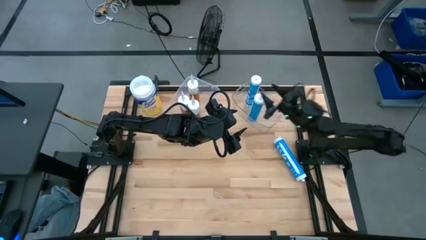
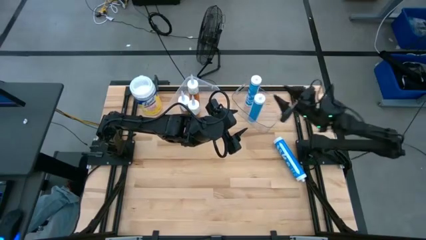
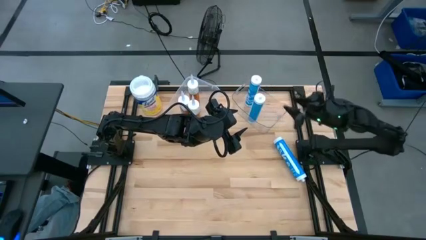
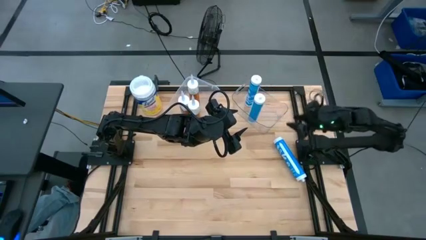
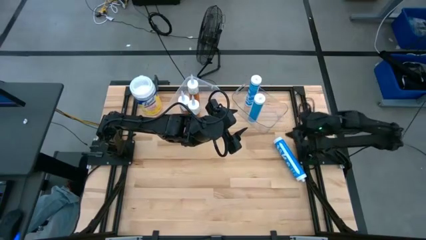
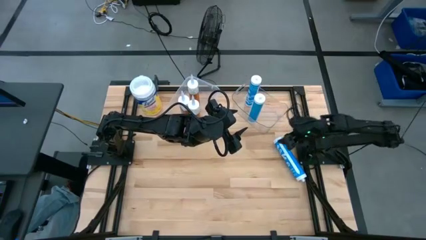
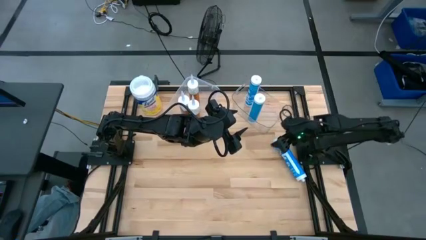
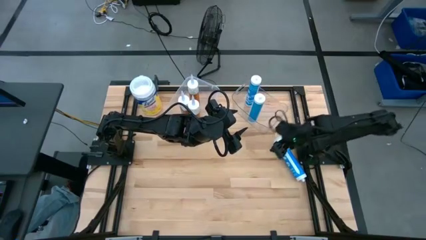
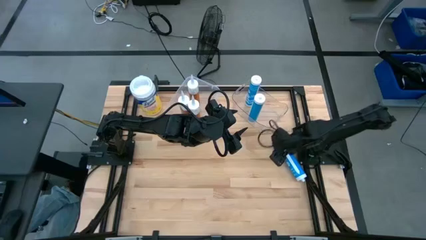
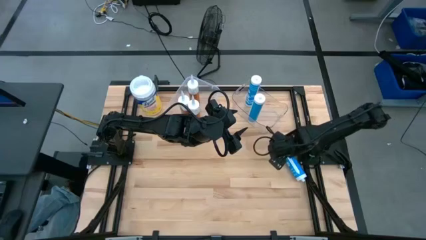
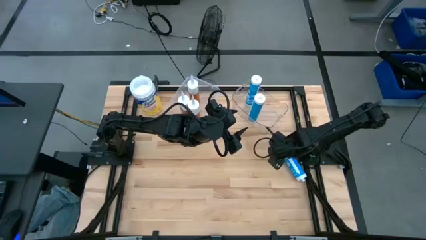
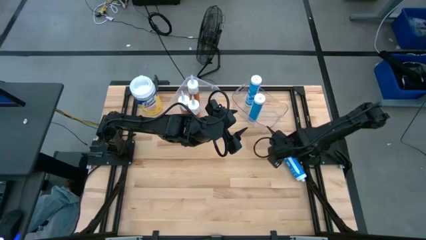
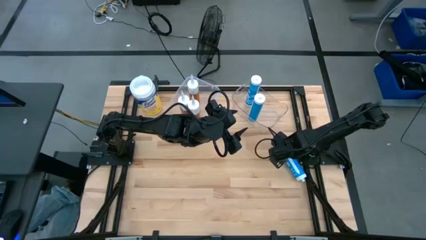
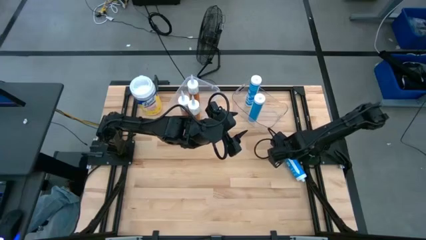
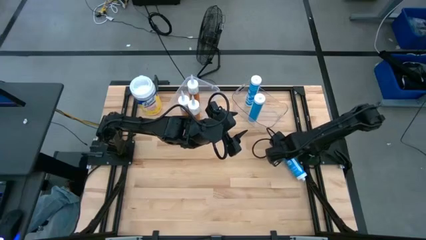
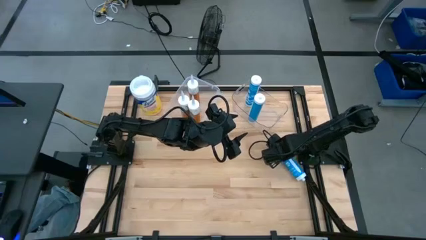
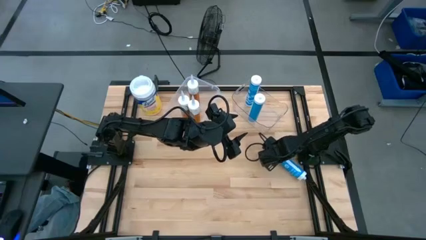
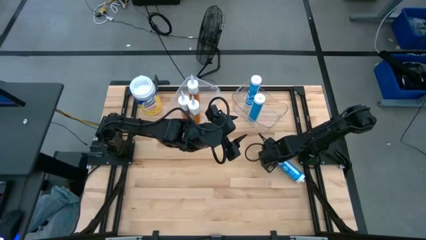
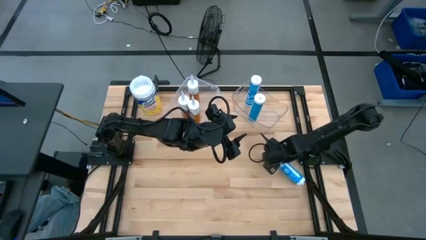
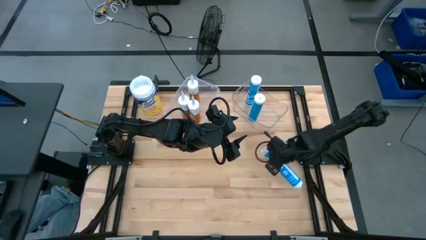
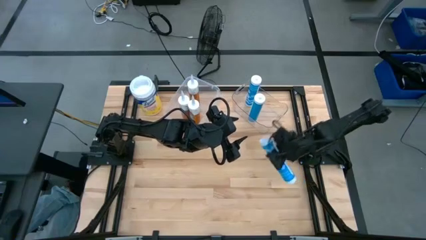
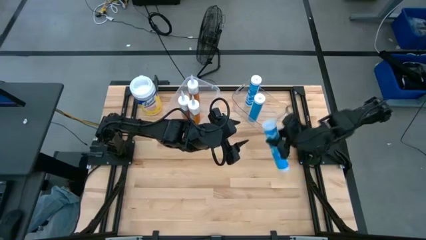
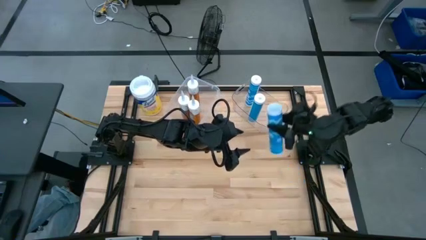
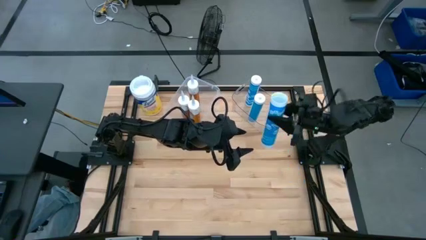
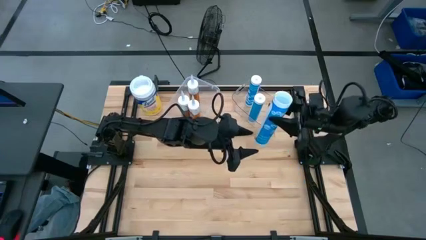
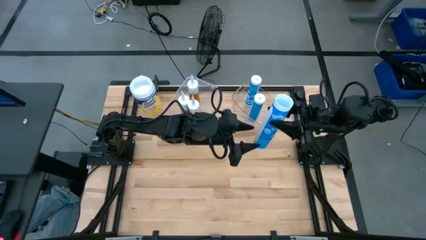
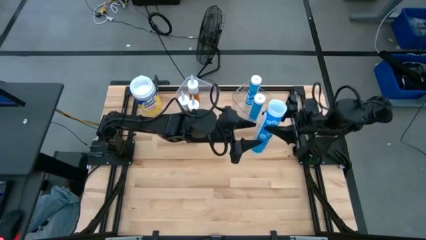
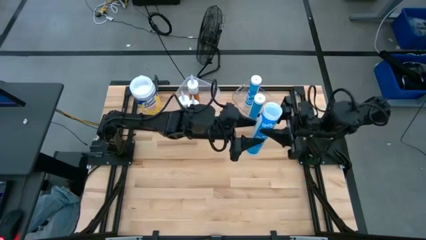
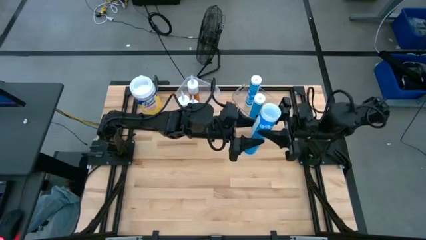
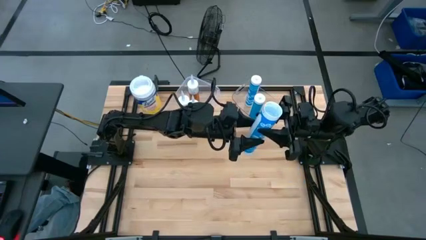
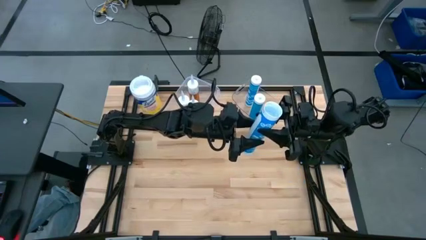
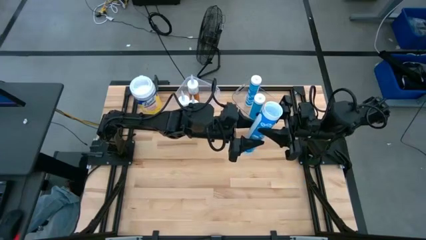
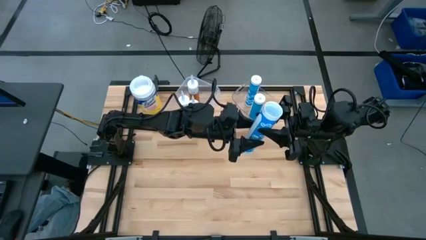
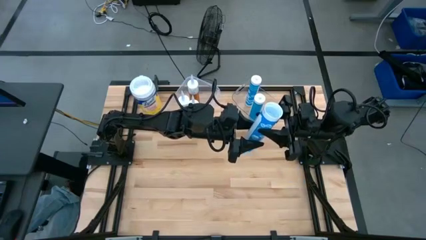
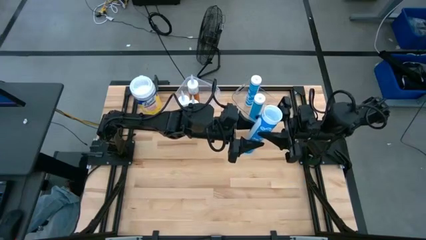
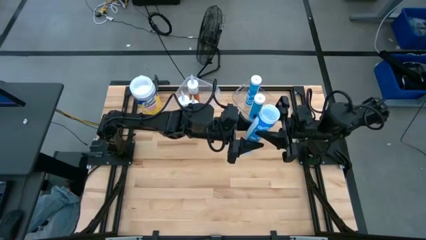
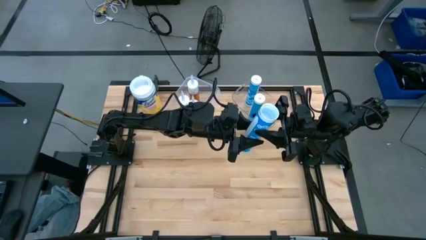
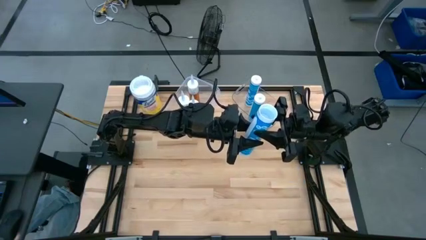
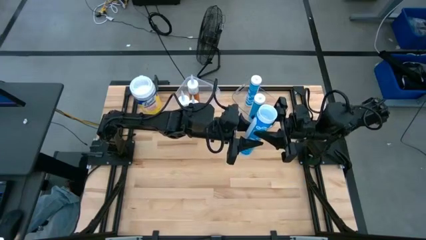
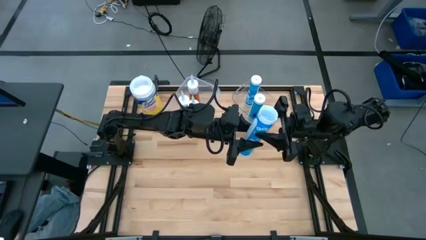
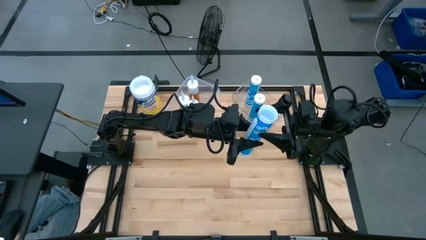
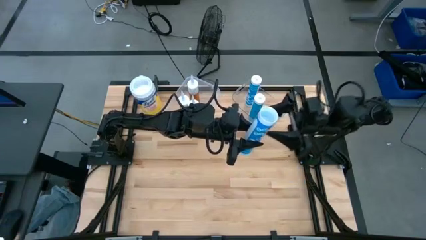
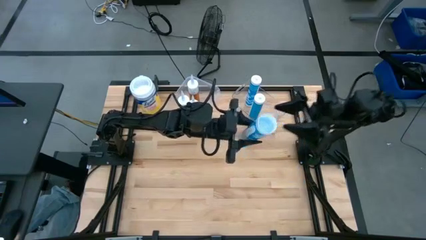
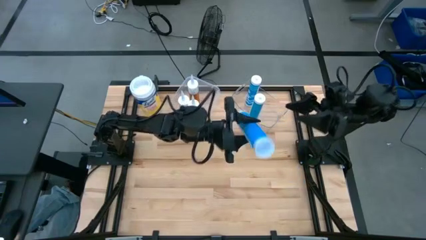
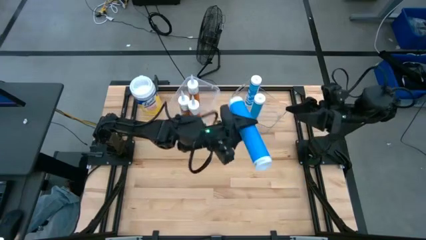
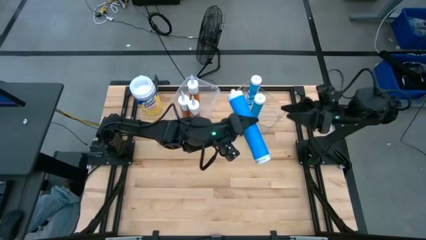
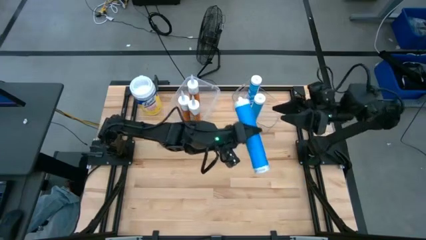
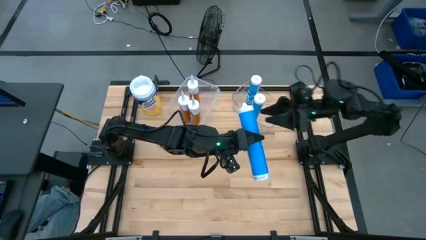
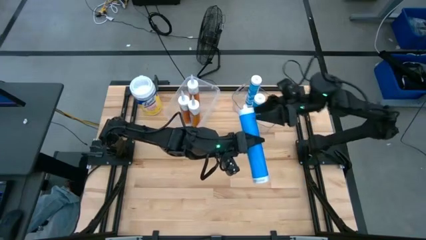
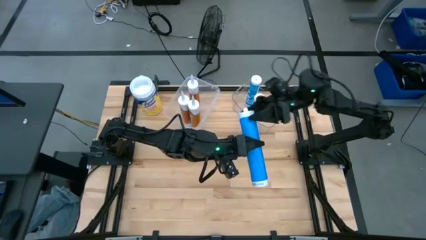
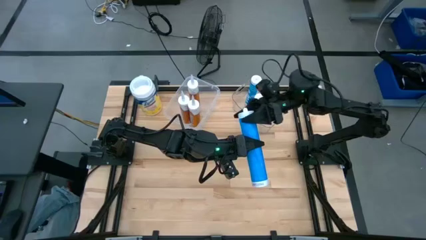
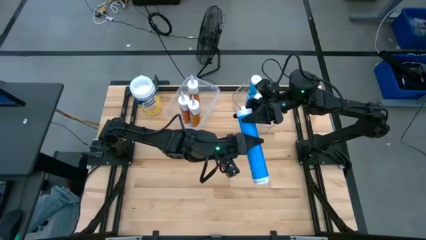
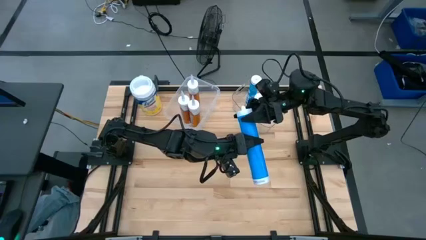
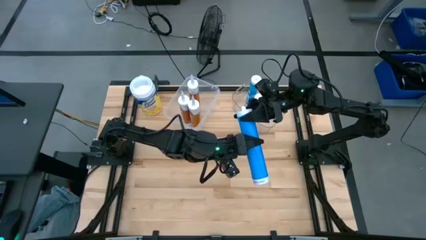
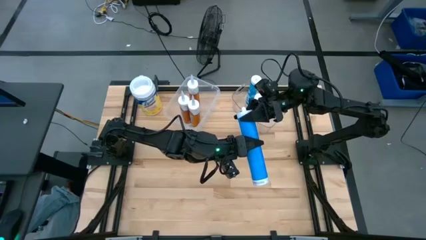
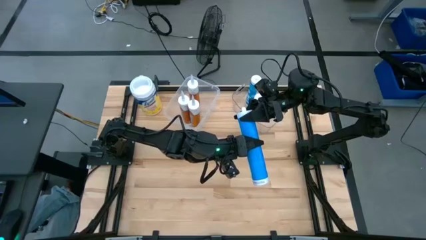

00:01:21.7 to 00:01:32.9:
Task: Pick & place silicon tubes, Sealant and Lysol wipes
Put the blue sealant into the right transparent bin

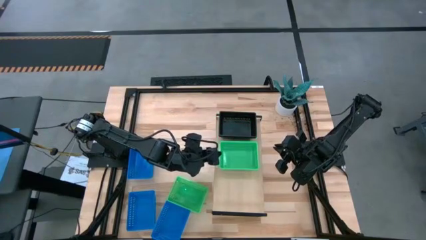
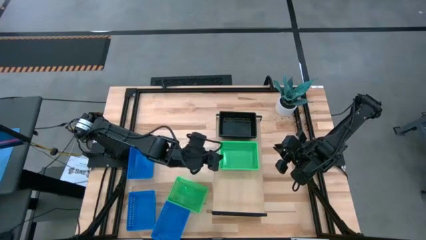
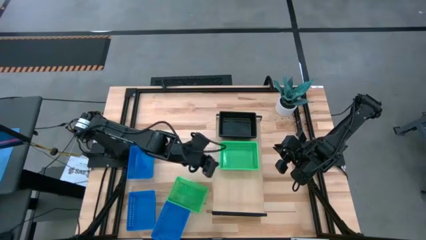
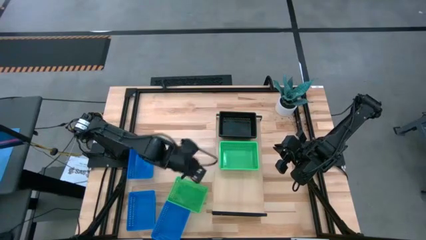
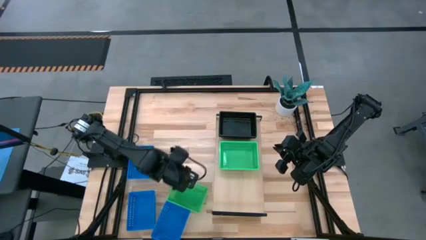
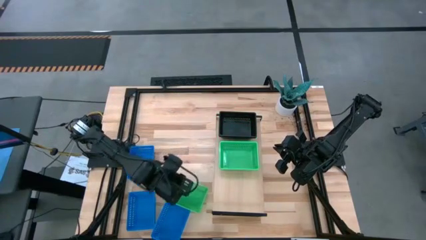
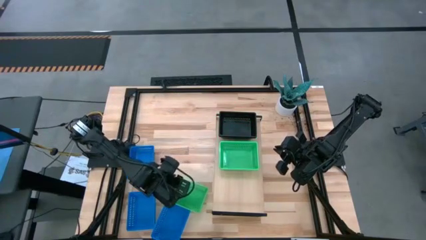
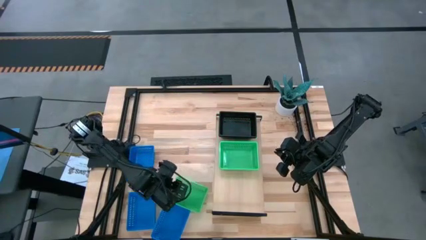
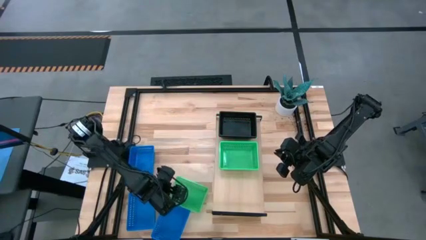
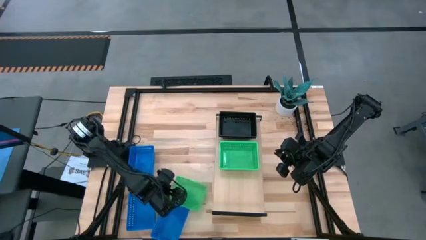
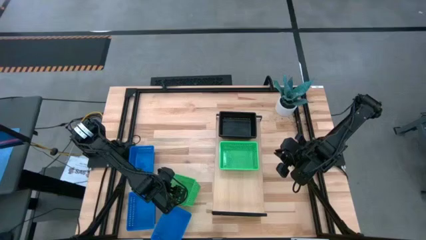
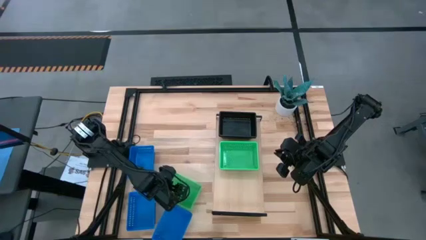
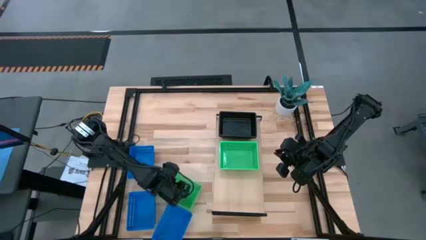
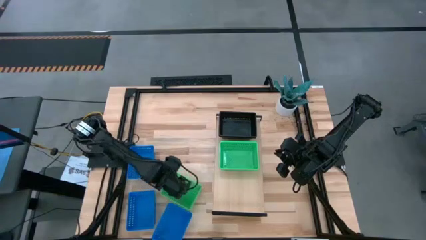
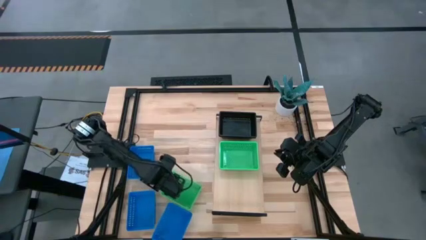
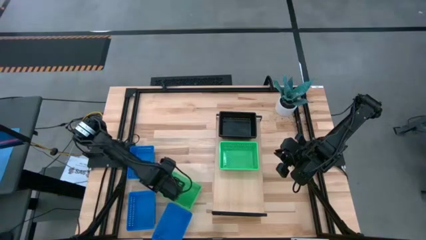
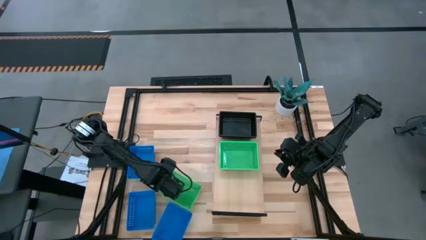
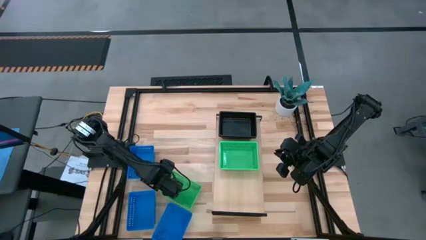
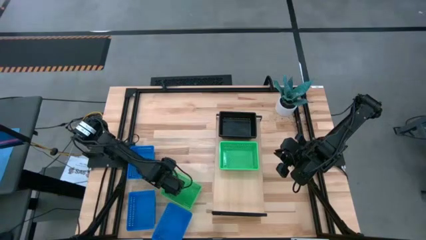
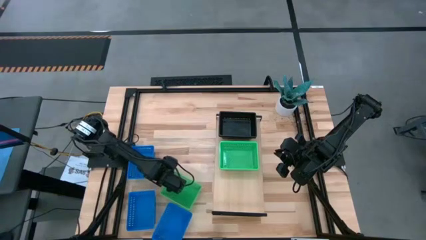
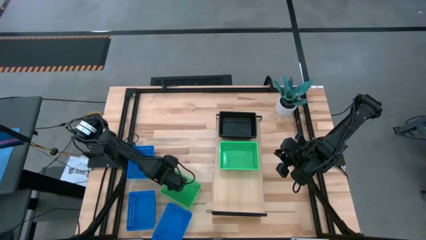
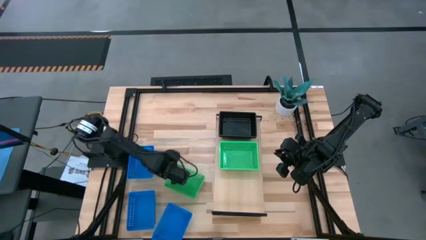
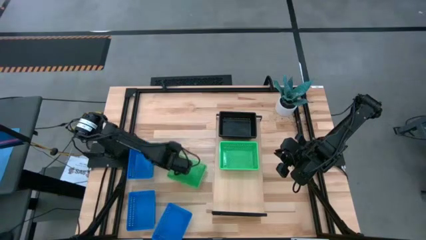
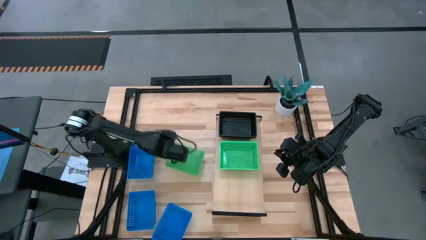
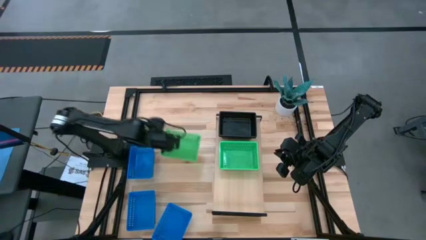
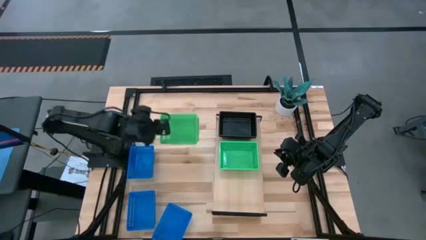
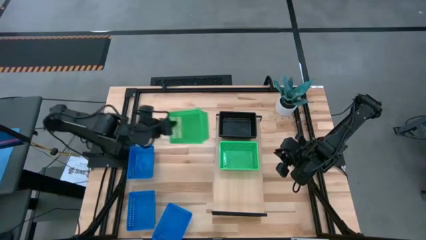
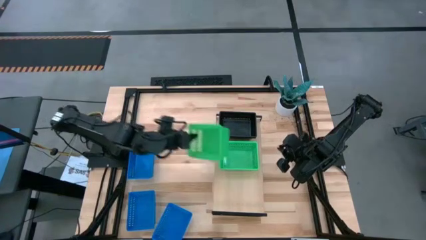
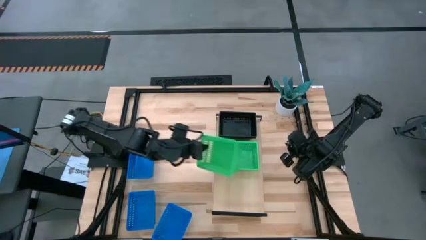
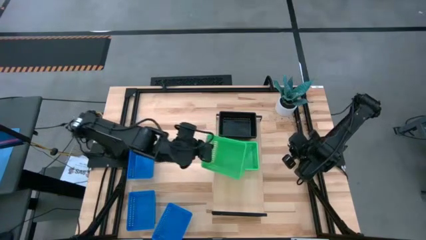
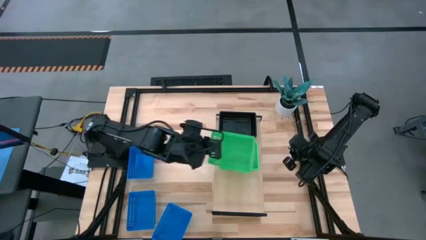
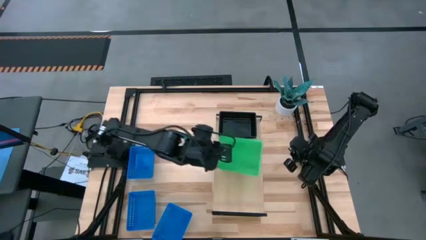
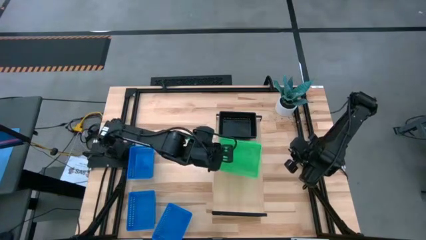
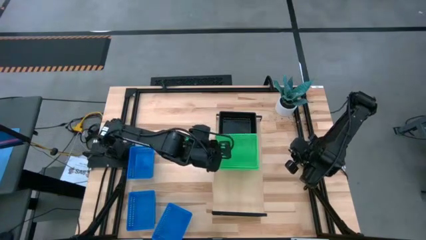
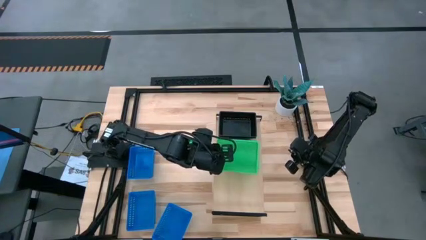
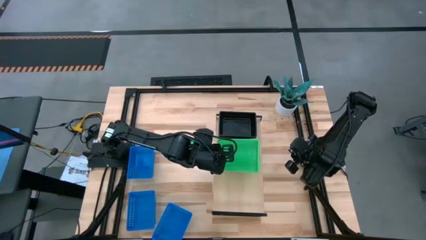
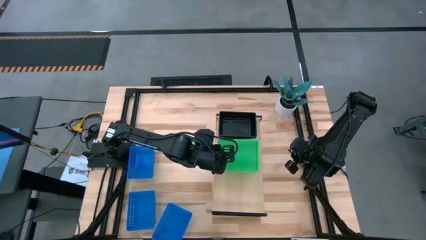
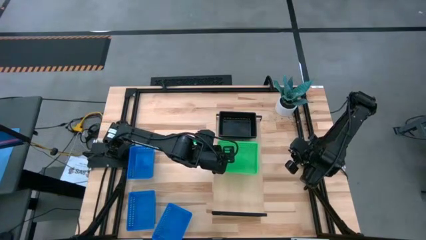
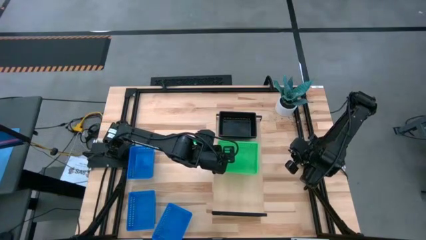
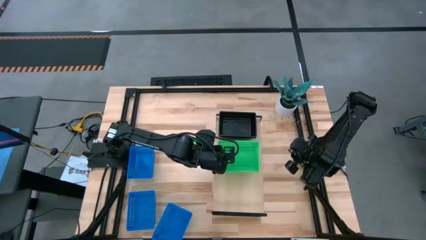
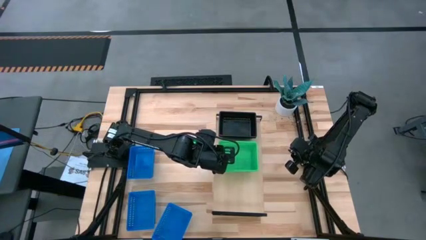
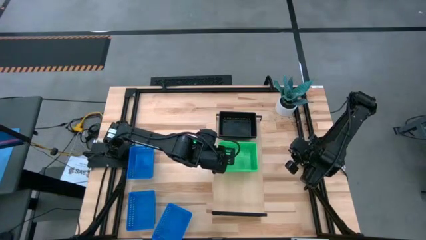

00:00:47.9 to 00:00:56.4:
Task: Stack baskets on shelf by color
Stack the green bin into the stacked green bin on the shelf
